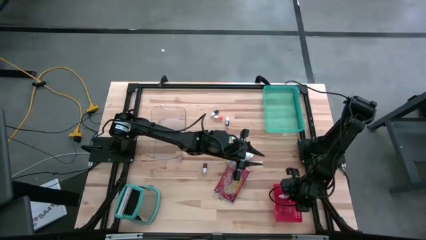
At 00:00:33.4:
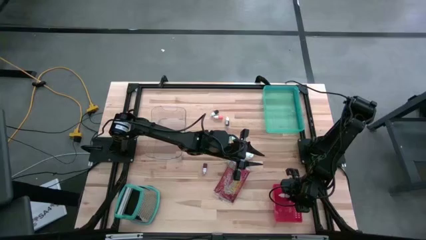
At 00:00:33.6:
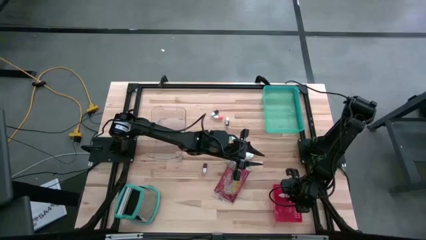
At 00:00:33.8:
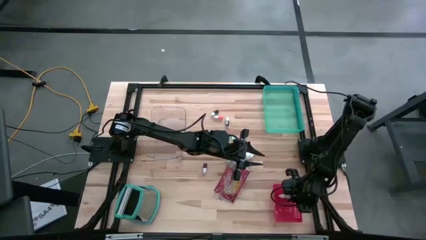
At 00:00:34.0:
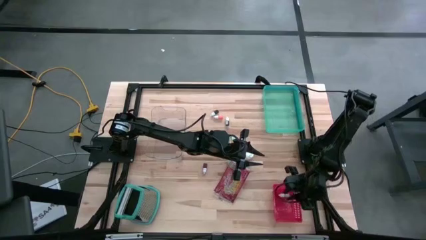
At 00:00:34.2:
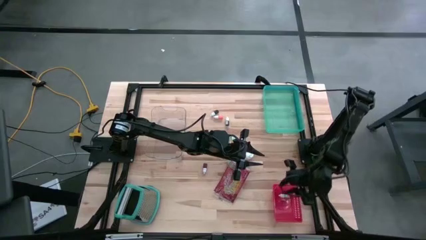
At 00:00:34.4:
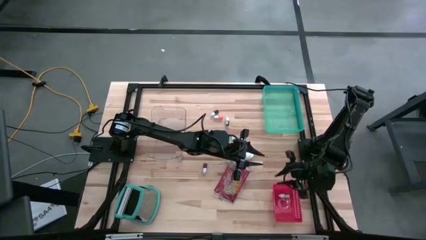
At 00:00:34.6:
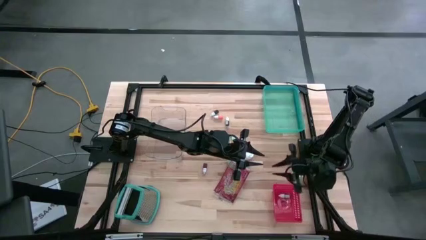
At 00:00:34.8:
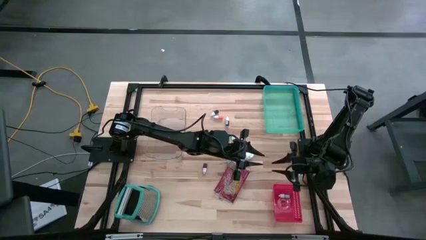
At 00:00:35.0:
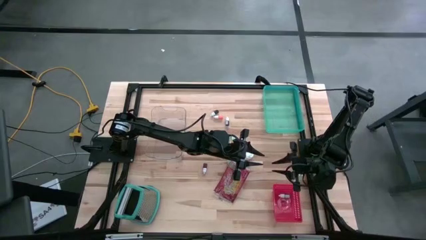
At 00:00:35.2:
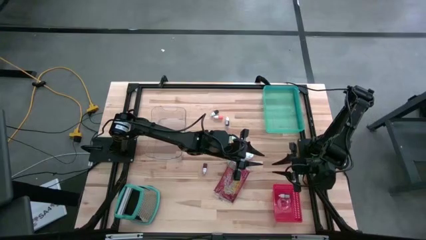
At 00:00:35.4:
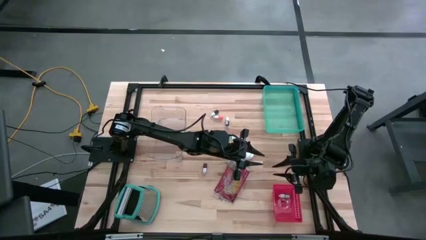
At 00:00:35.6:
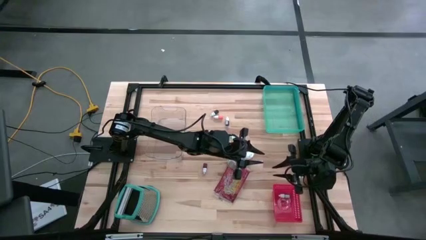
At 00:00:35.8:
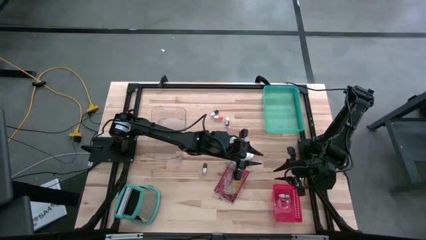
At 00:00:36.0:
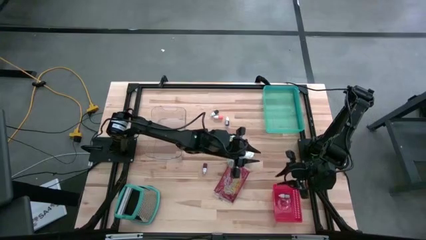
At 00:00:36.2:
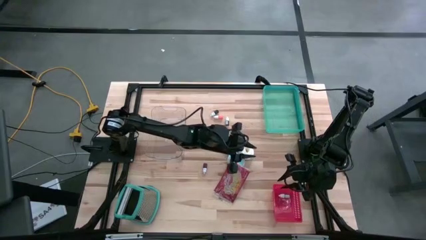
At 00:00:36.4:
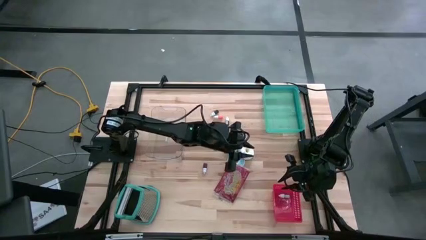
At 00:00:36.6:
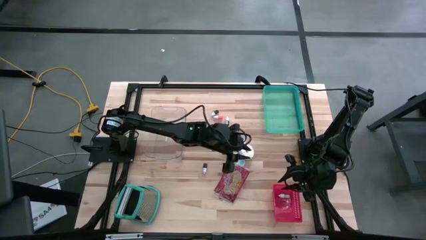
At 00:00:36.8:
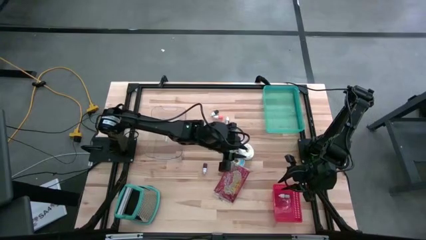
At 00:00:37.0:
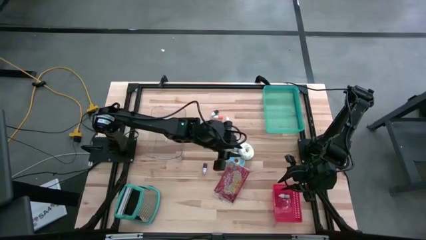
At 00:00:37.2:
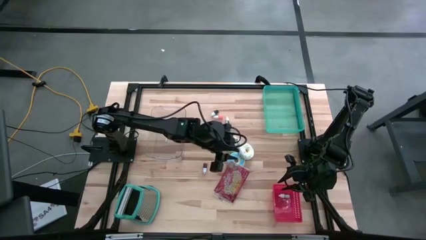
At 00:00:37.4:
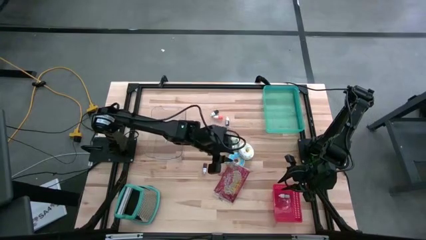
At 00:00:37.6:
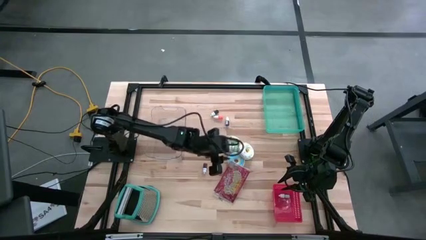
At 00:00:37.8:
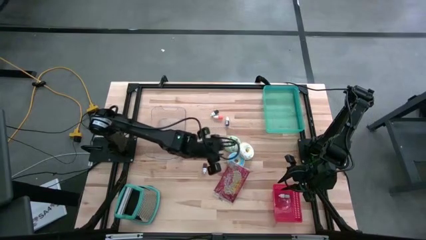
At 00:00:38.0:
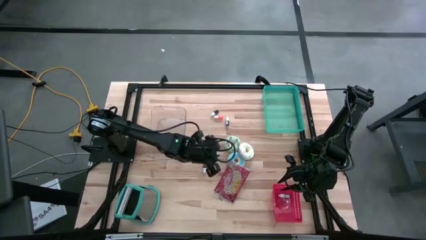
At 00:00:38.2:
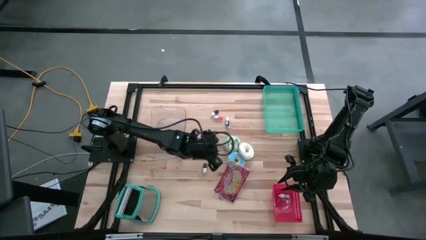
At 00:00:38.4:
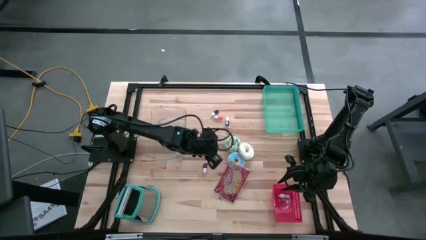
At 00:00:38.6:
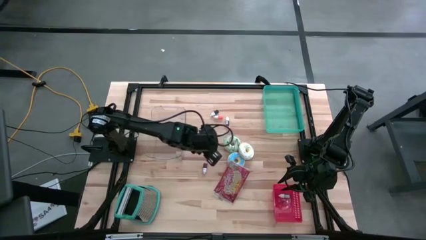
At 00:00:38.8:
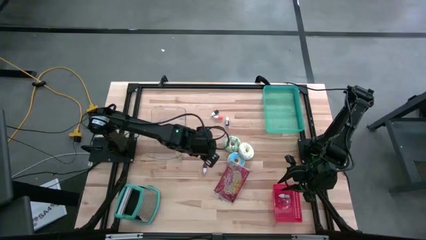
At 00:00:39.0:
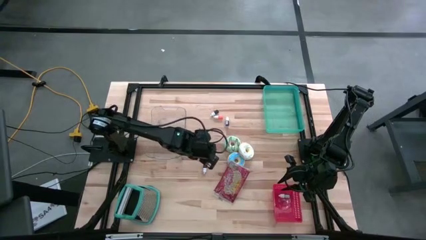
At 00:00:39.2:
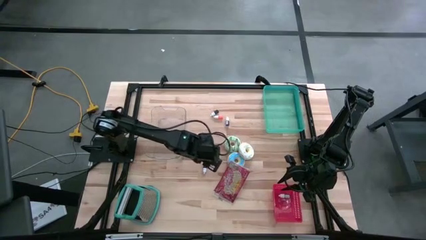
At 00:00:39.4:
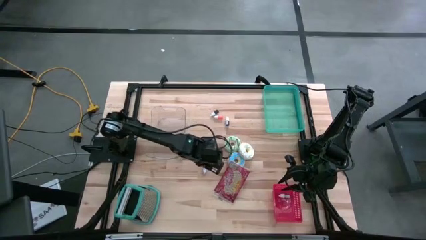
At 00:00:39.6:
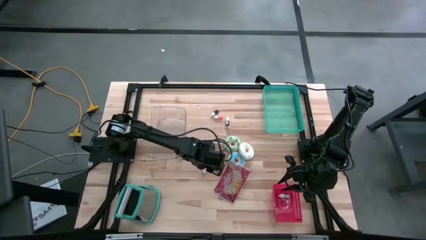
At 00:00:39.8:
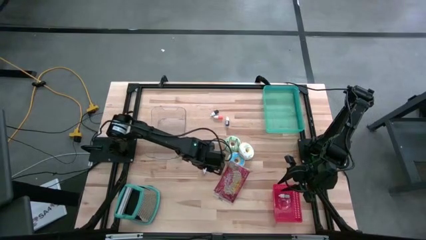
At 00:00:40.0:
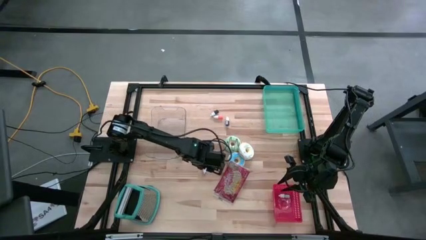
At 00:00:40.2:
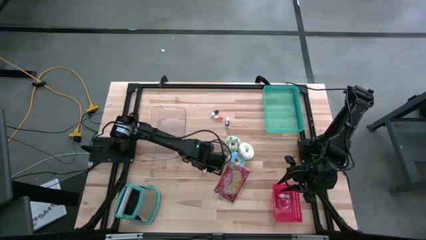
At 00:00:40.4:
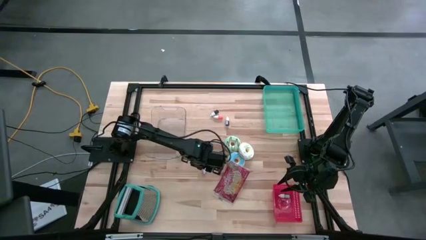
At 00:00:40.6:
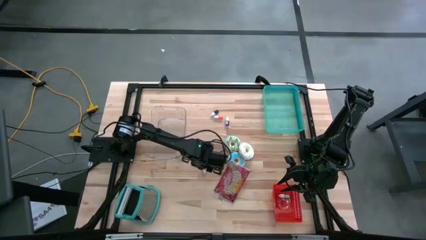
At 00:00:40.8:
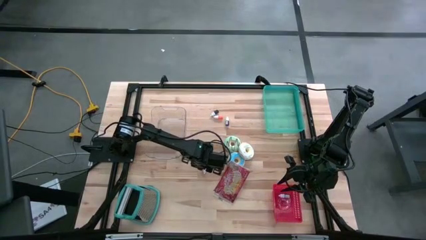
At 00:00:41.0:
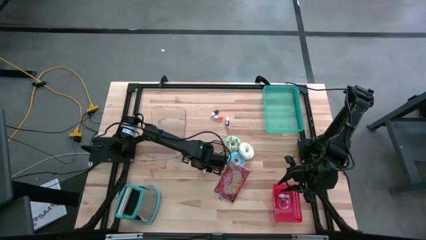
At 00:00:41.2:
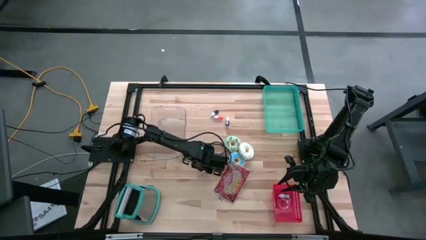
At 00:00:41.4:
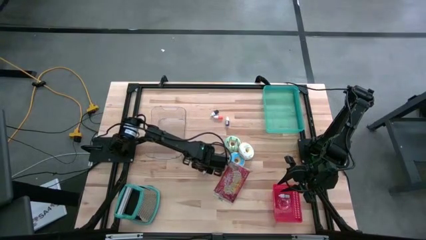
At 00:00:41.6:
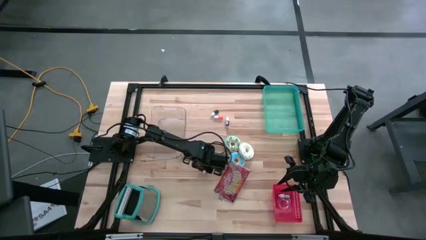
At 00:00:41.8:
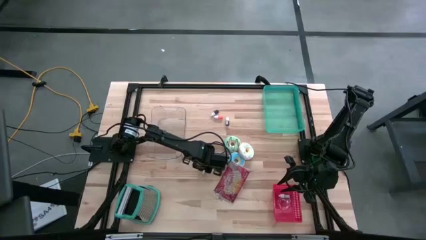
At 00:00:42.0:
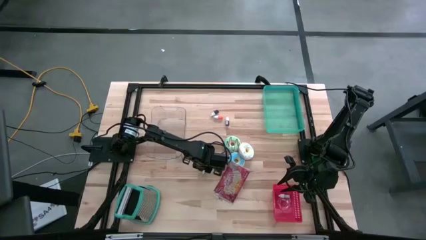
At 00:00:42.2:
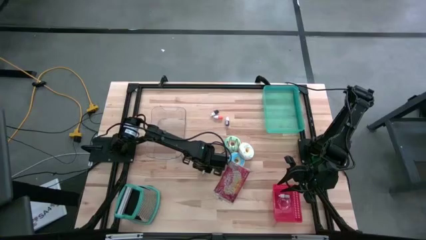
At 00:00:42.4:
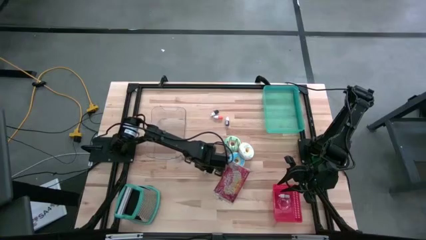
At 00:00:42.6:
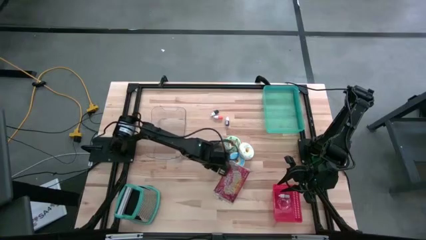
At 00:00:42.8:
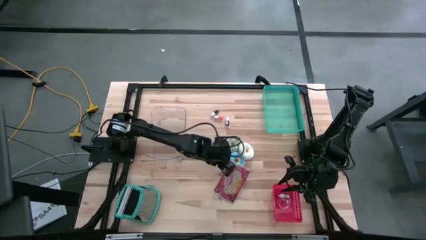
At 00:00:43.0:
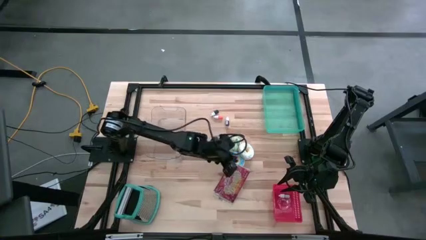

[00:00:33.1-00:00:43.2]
Put the red food coloring bottle into the red bin
